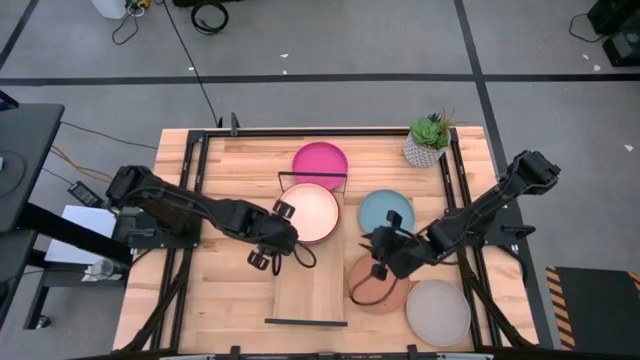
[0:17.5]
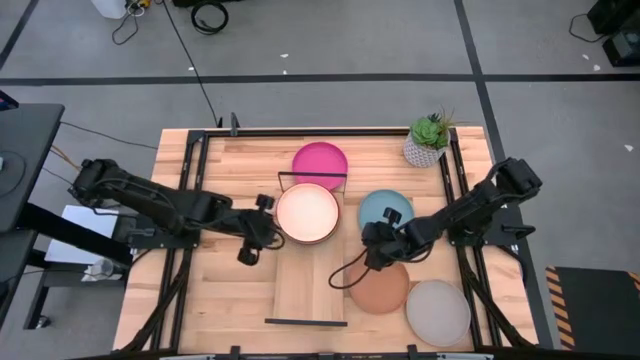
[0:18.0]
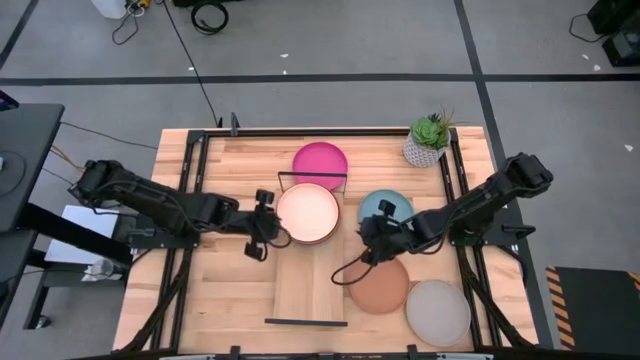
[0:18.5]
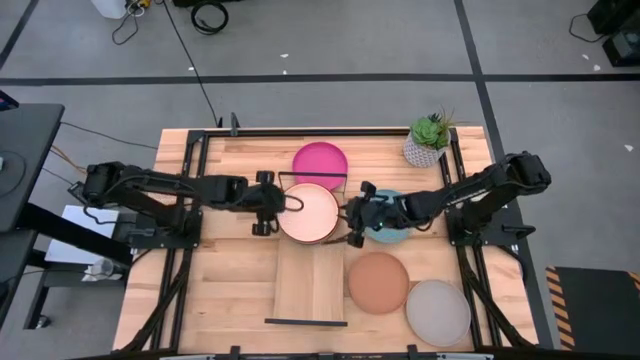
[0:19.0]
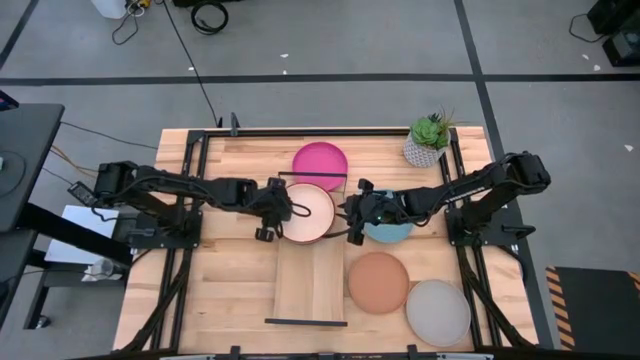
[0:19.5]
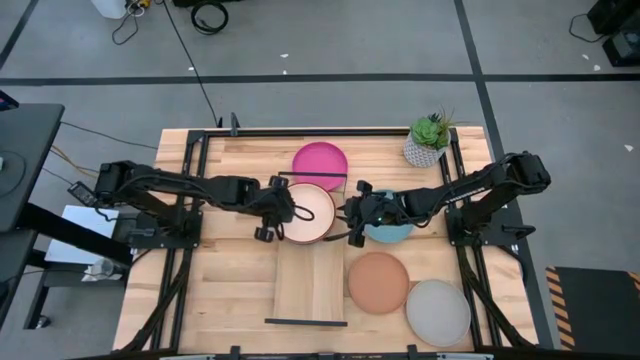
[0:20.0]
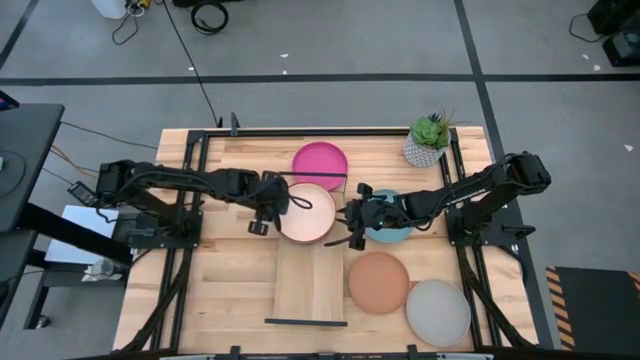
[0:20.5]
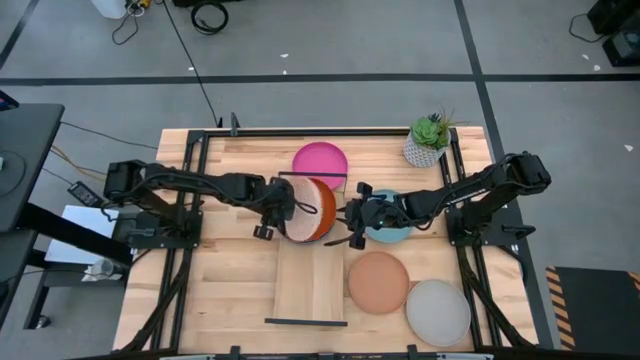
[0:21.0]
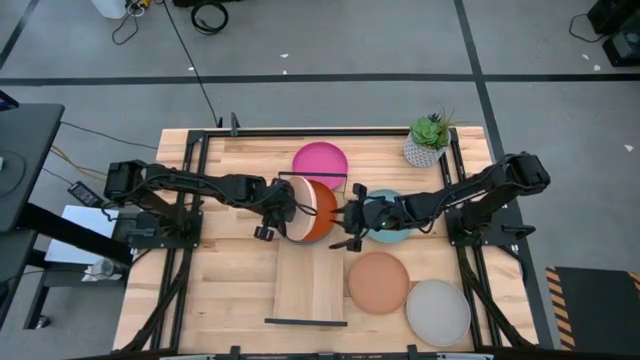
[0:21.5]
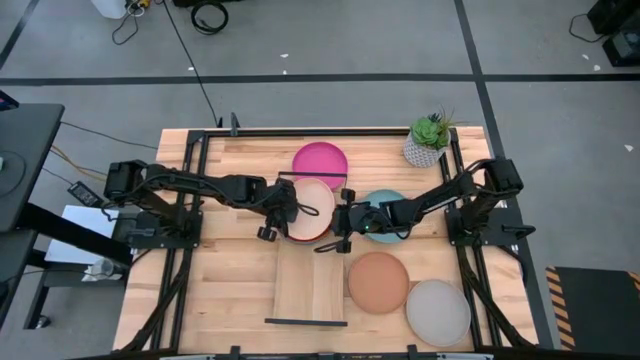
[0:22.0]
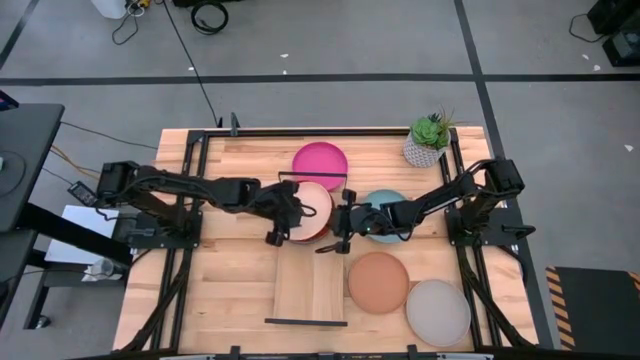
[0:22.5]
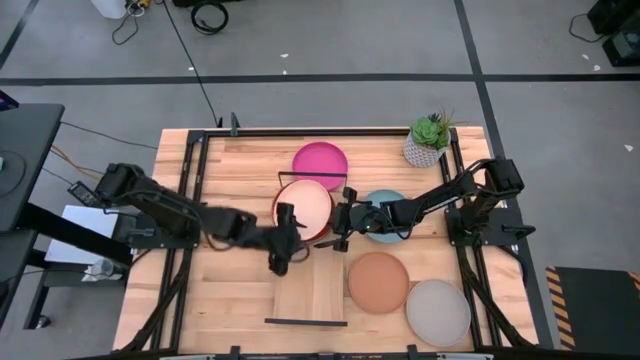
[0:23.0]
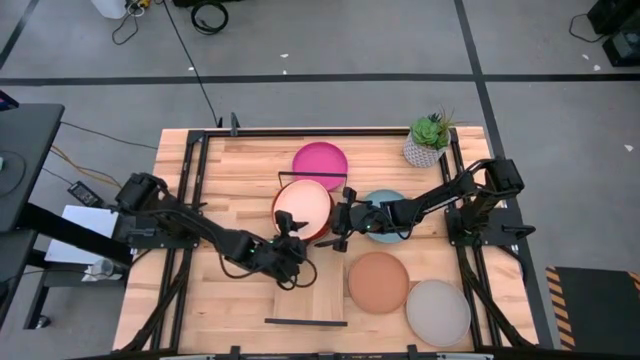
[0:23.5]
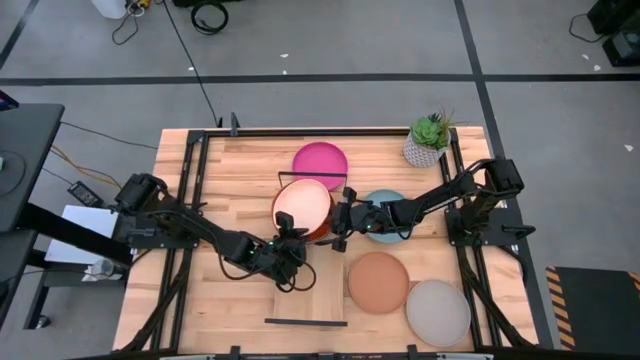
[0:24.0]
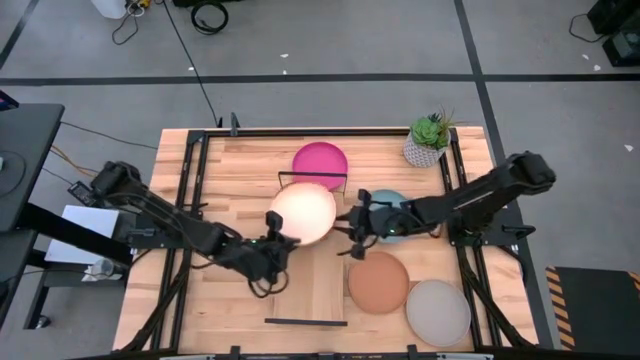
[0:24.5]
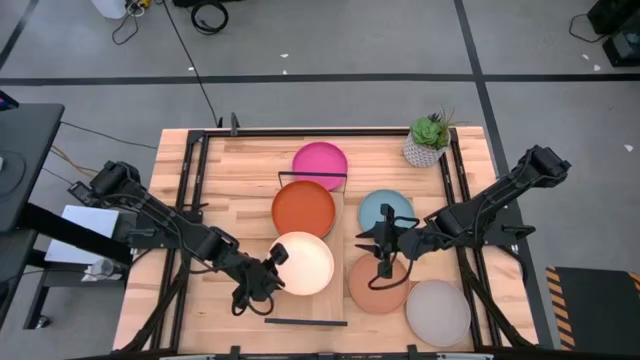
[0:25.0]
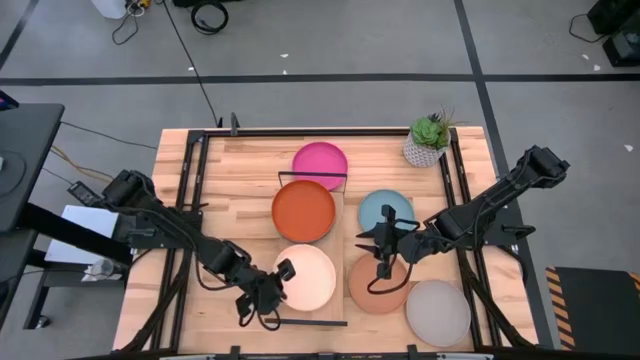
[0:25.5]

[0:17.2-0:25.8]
Task: Place and stack plates onto a shelf
Put the light brown plate on the shelf

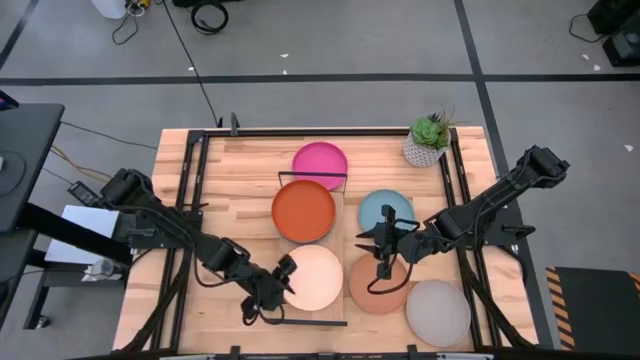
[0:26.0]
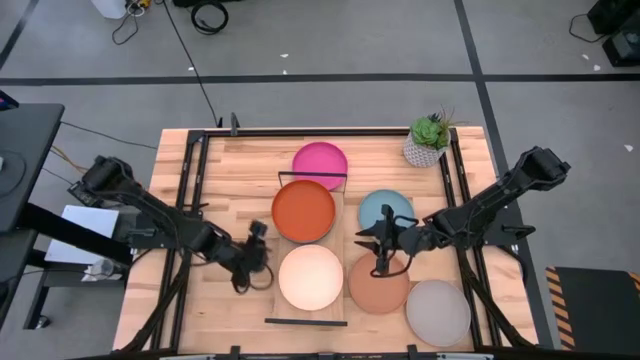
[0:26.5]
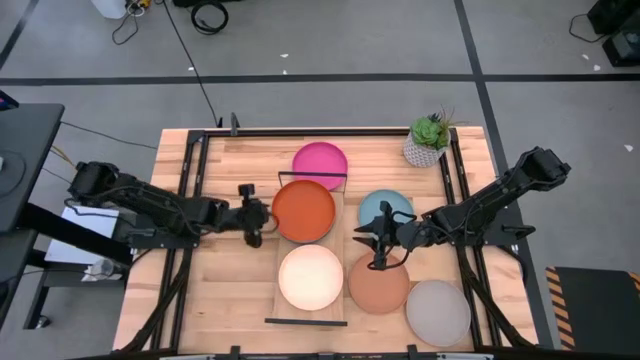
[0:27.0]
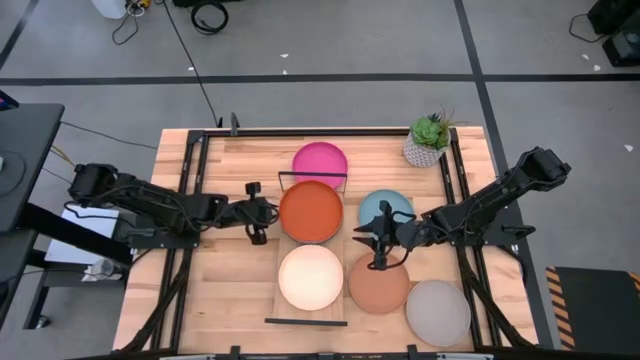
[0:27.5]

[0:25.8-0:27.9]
Adjust the stacked plates

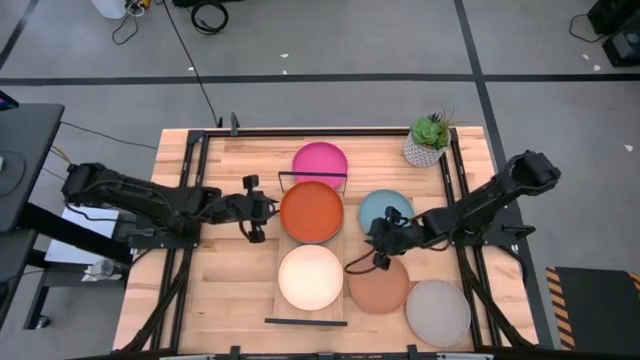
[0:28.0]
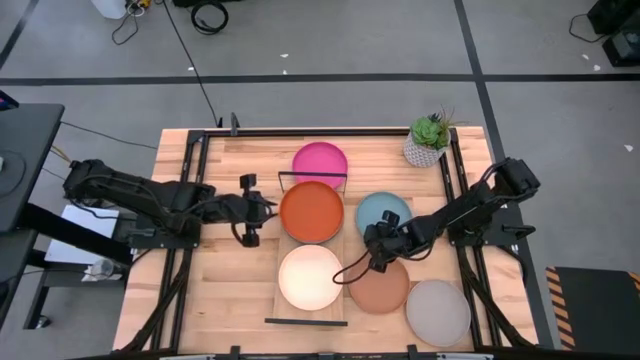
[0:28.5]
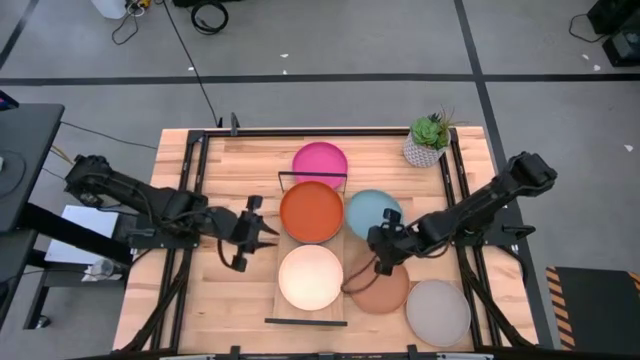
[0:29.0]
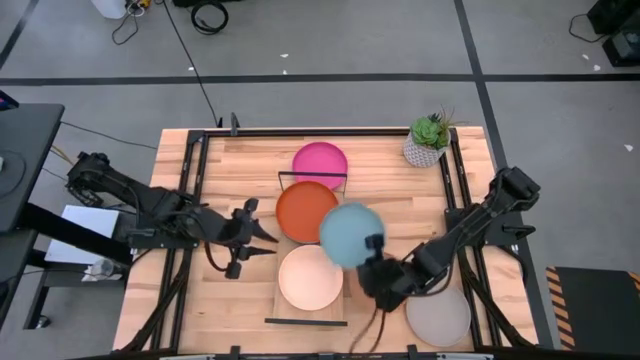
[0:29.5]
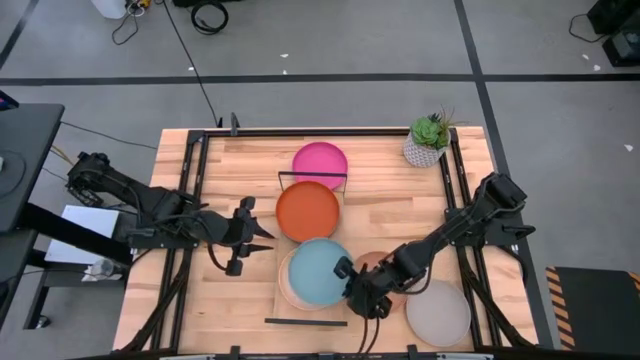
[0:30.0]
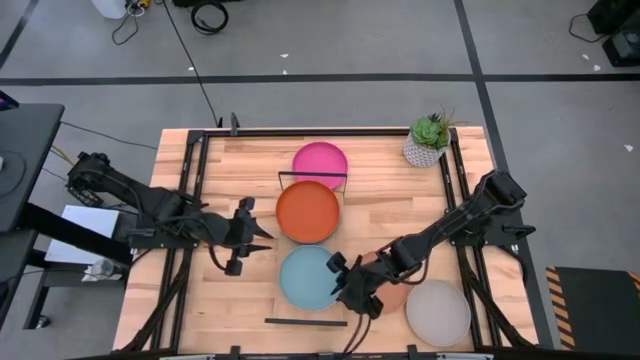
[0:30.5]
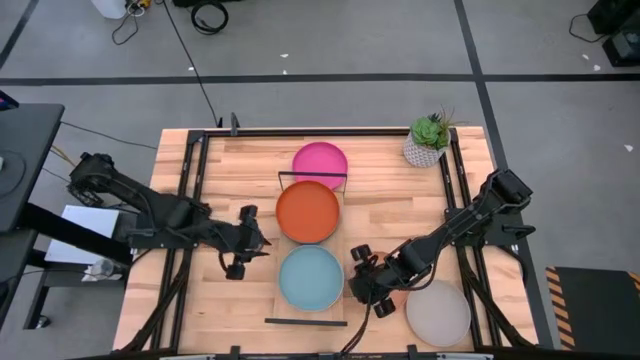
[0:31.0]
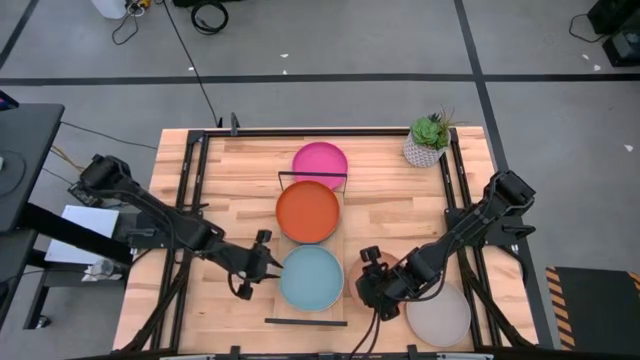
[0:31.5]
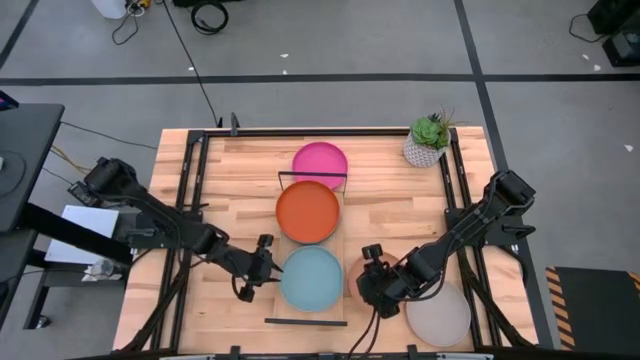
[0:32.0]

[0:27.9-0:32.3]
Stack the light blue plate on top of the light brown plate

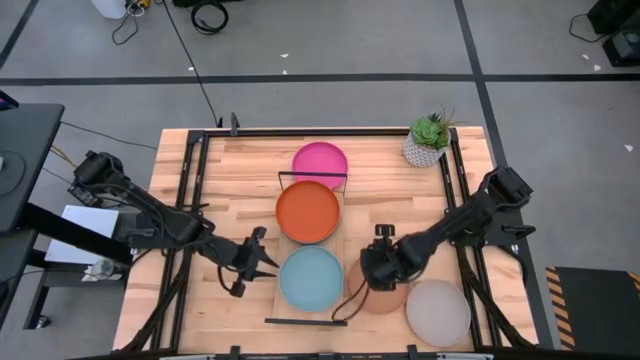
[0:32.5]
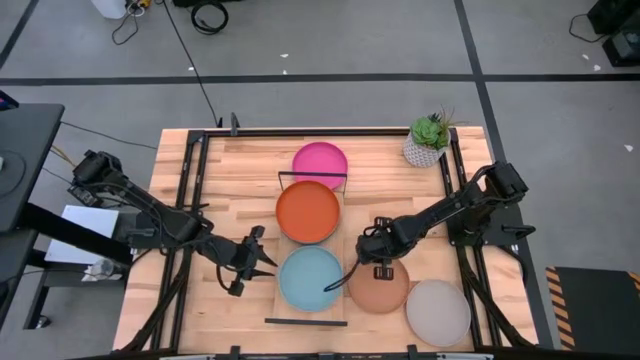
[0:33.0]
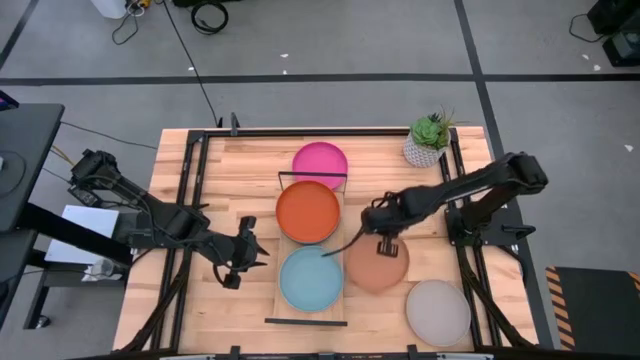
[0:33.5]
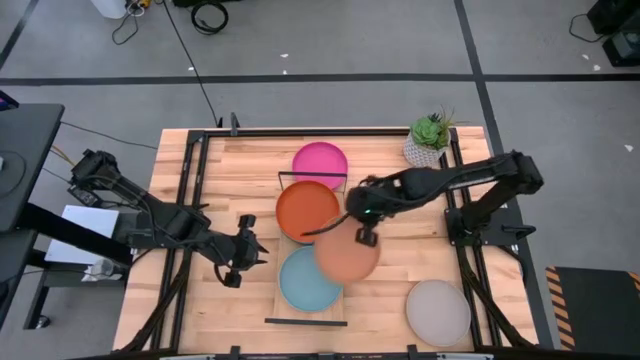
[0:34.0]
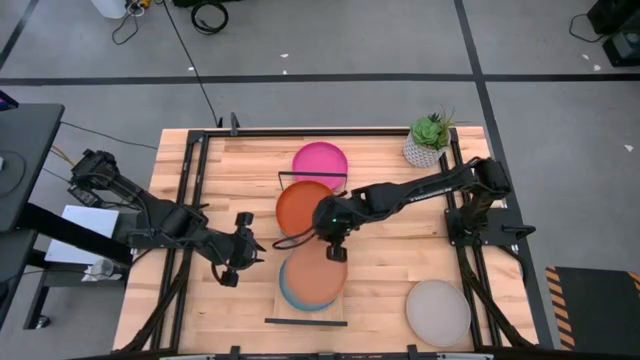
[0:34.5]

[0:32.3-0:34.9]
Stack the brown plate on top of the light blue plate

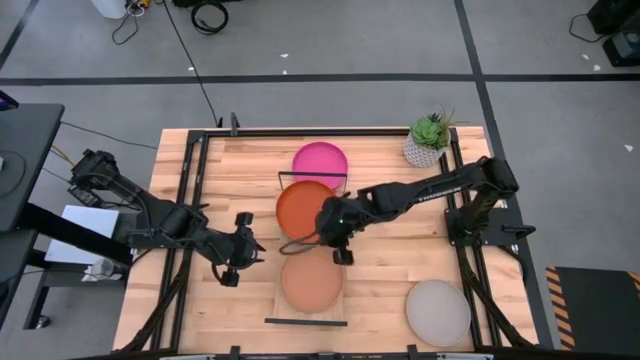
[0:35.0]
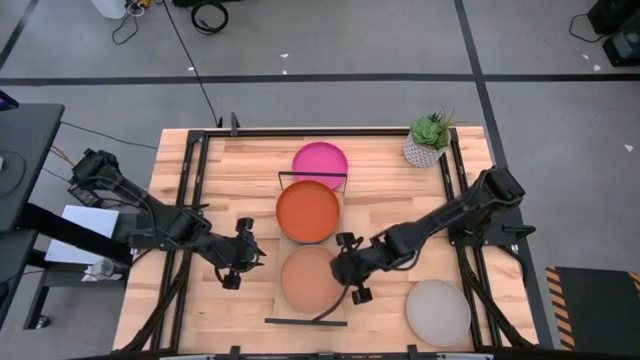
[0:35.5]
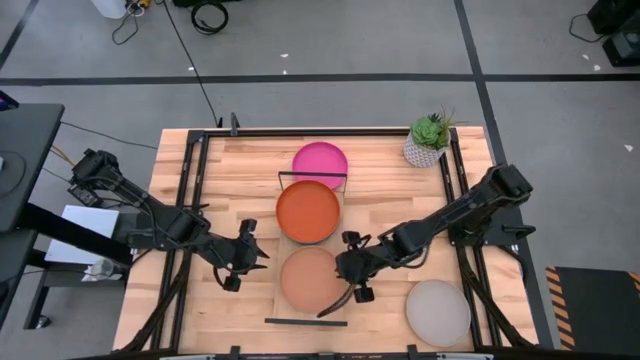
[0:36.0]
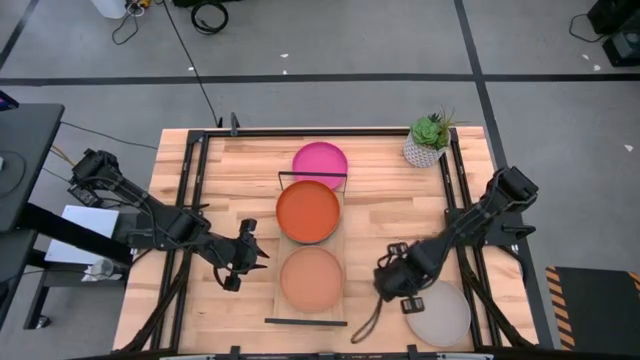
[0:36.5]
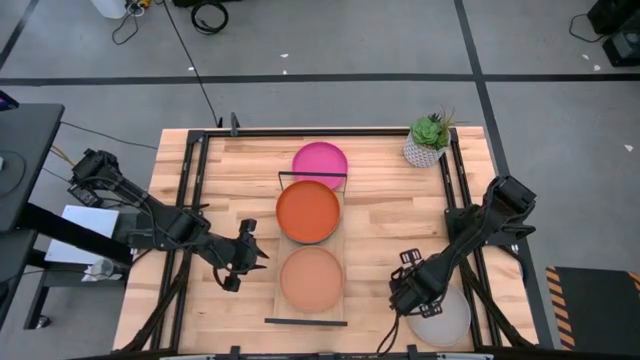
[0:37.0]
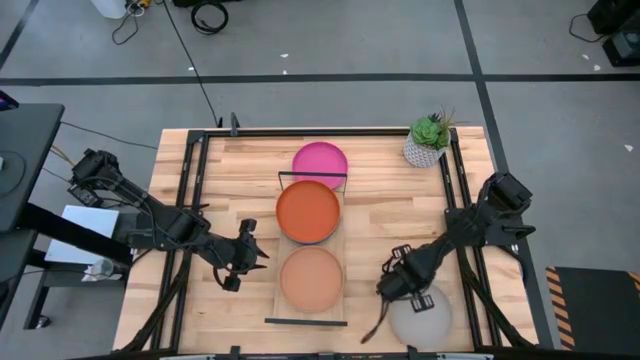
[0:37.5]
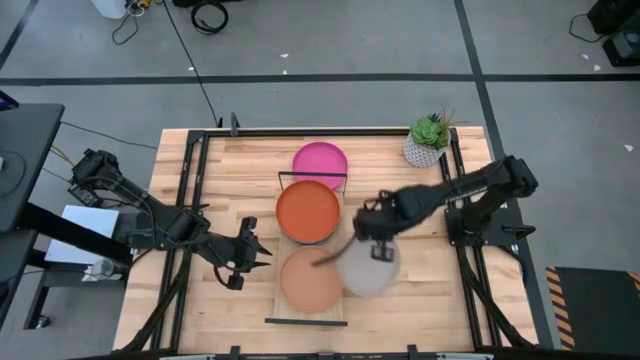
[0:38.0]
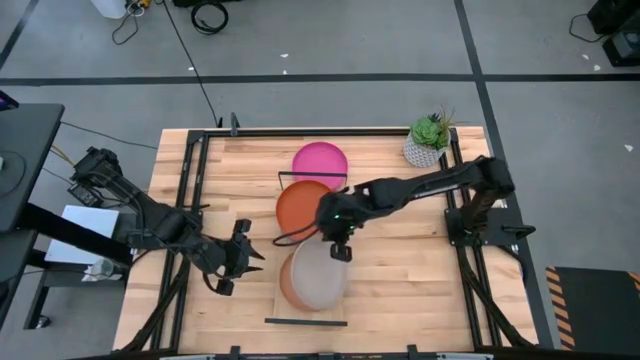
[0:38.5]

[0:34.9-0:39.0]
Stack the gray plate on top of the brown plate
